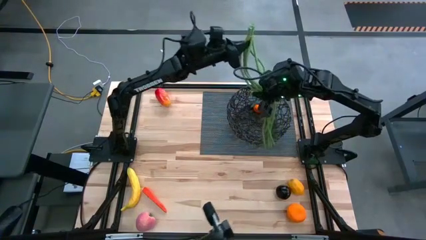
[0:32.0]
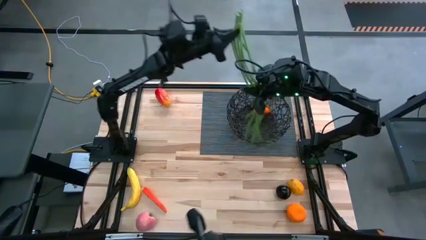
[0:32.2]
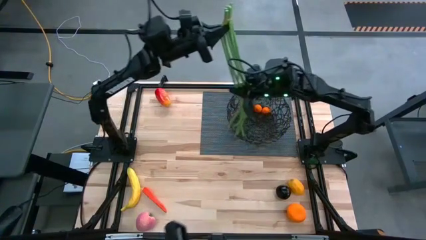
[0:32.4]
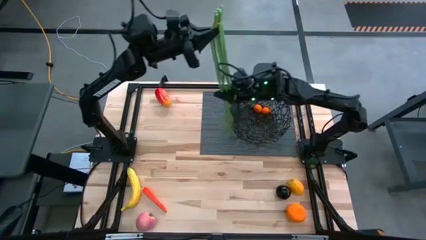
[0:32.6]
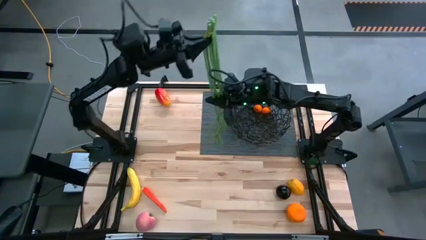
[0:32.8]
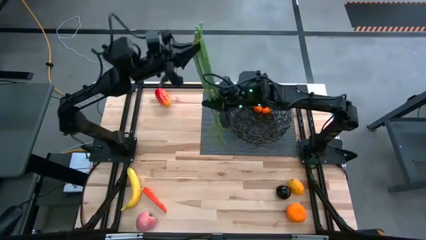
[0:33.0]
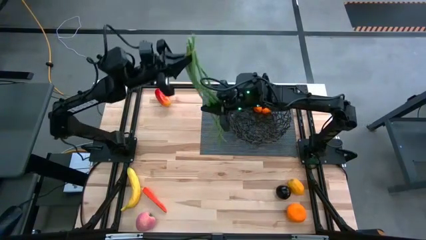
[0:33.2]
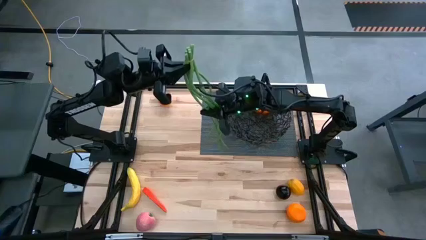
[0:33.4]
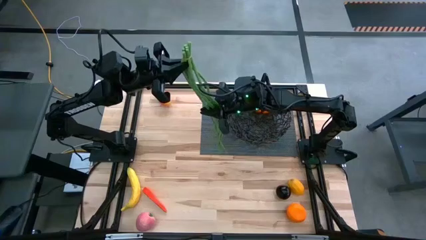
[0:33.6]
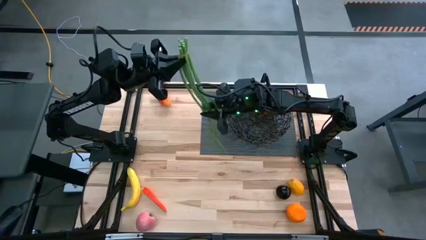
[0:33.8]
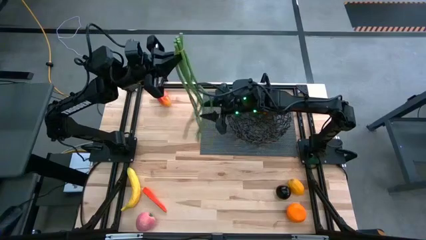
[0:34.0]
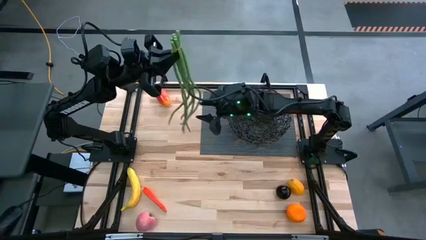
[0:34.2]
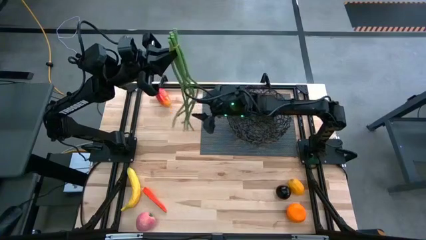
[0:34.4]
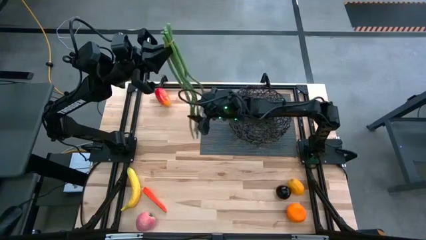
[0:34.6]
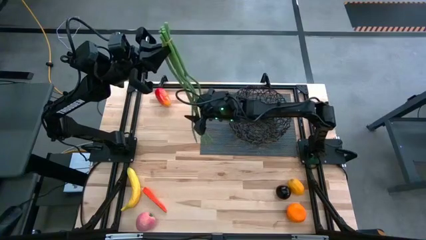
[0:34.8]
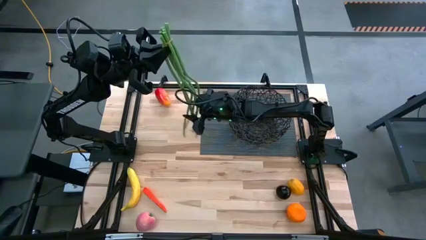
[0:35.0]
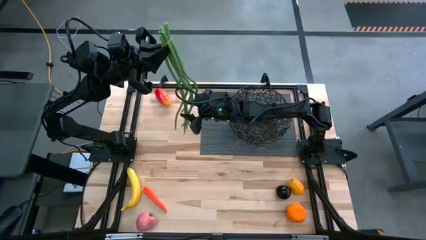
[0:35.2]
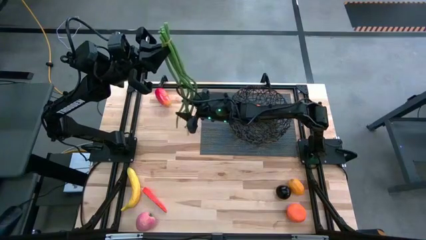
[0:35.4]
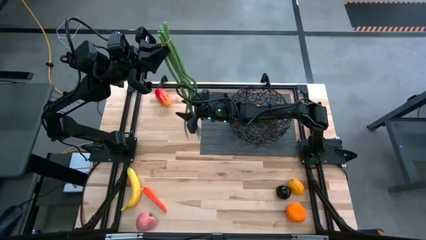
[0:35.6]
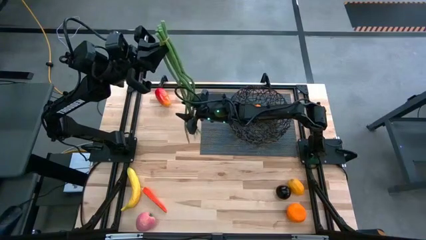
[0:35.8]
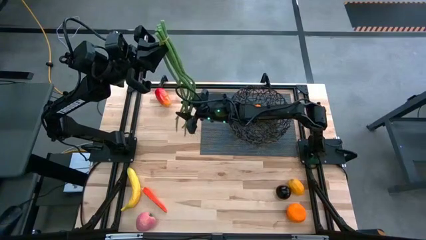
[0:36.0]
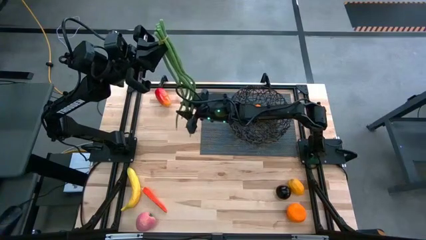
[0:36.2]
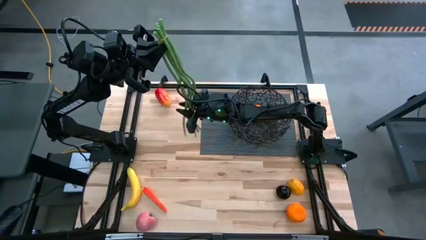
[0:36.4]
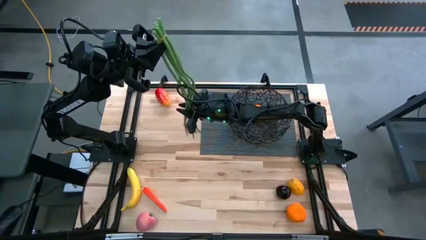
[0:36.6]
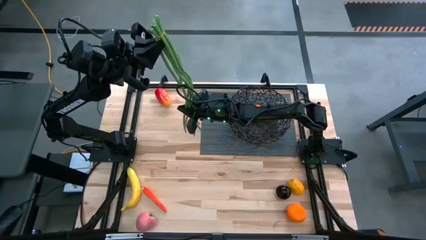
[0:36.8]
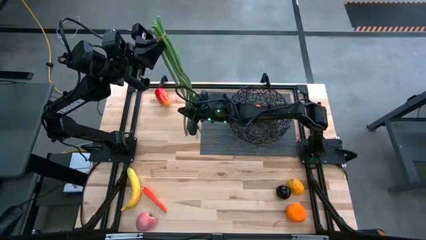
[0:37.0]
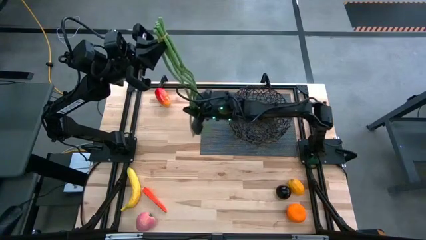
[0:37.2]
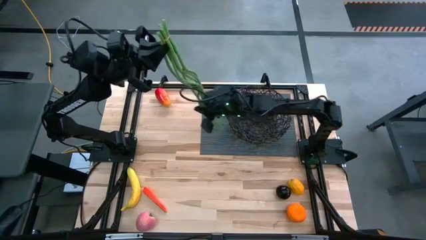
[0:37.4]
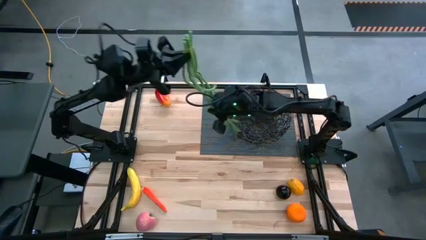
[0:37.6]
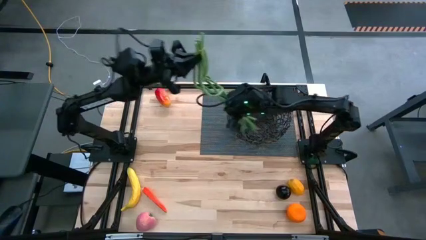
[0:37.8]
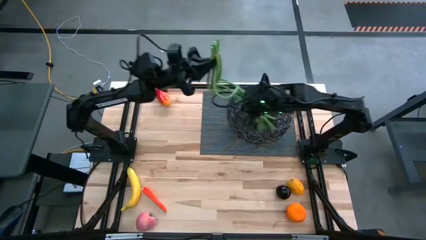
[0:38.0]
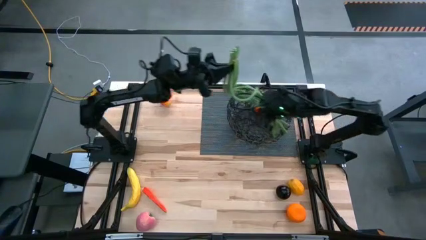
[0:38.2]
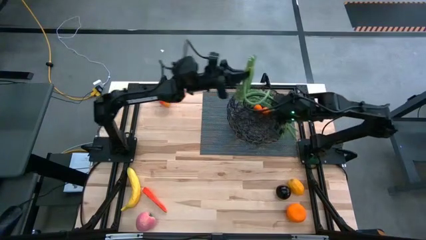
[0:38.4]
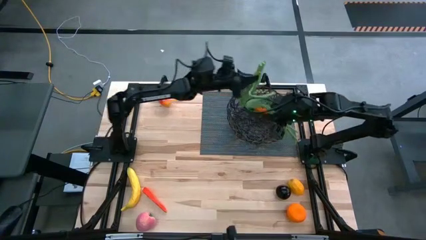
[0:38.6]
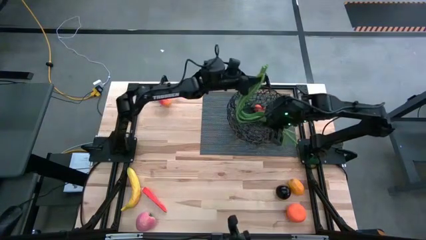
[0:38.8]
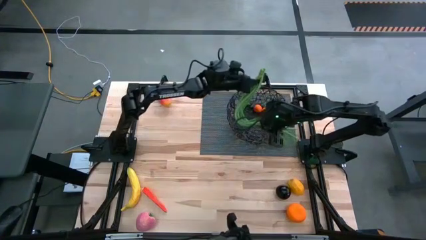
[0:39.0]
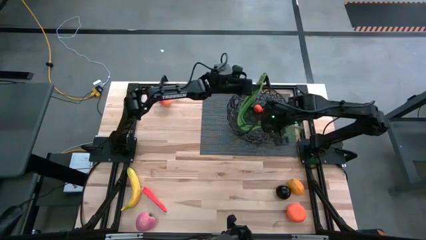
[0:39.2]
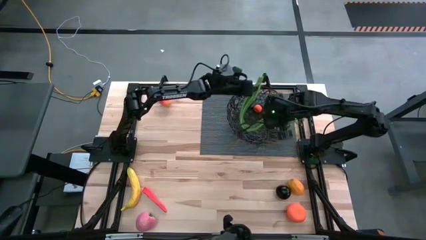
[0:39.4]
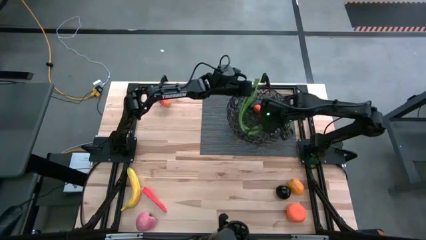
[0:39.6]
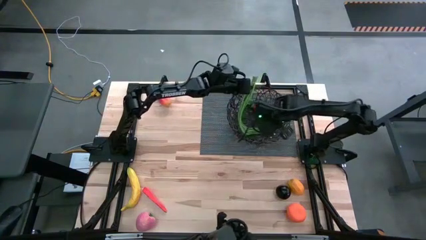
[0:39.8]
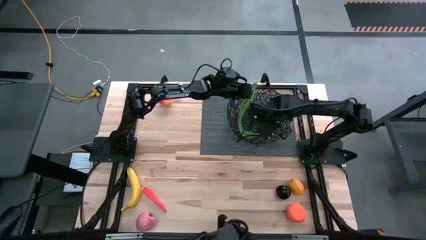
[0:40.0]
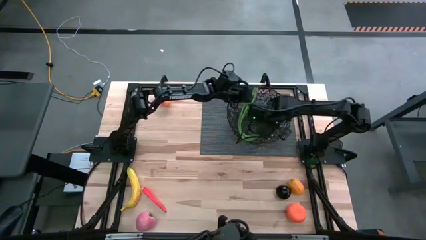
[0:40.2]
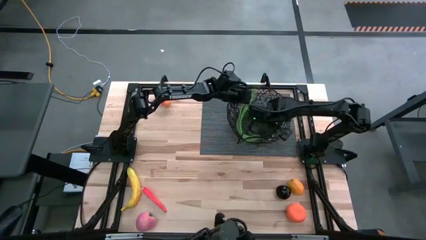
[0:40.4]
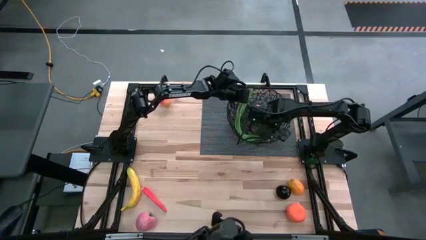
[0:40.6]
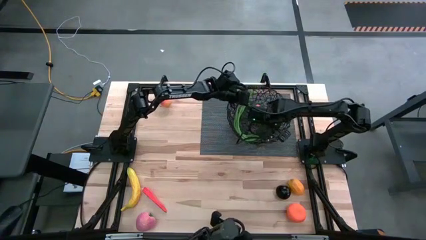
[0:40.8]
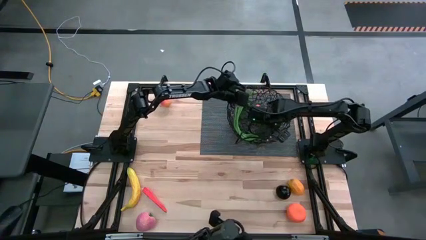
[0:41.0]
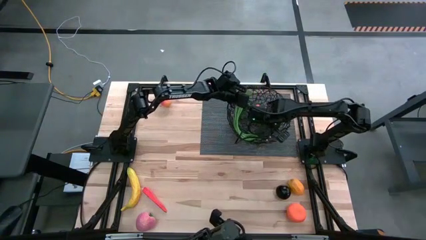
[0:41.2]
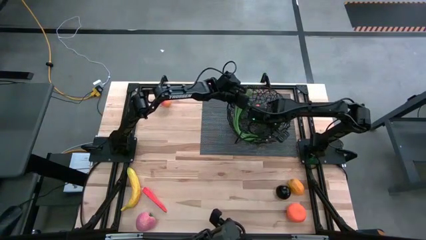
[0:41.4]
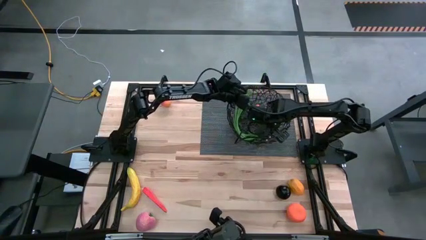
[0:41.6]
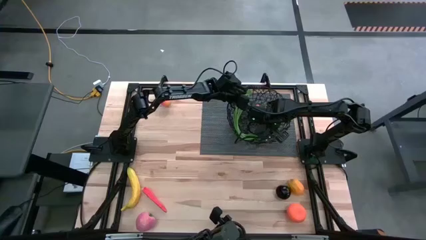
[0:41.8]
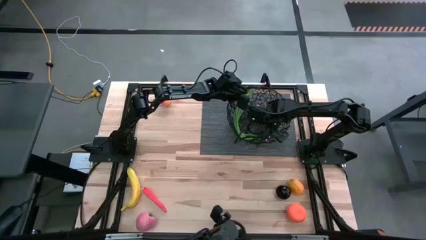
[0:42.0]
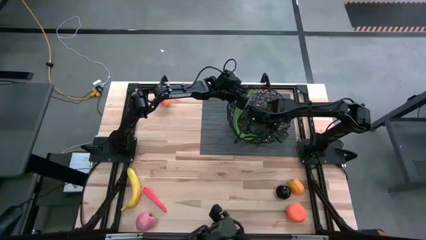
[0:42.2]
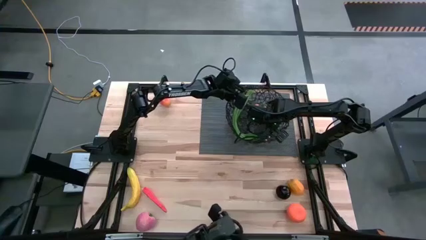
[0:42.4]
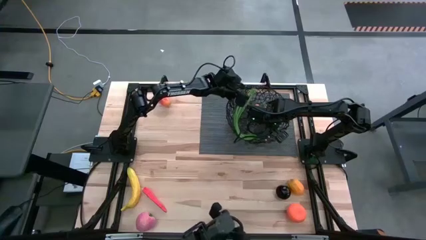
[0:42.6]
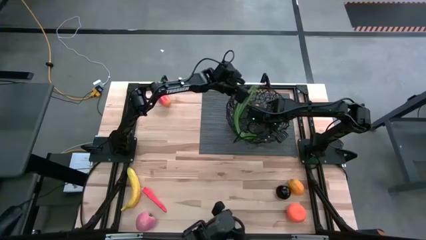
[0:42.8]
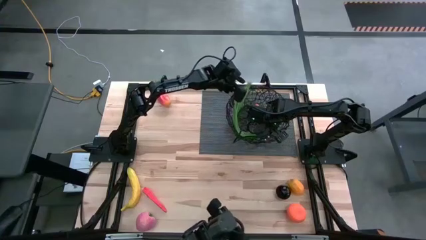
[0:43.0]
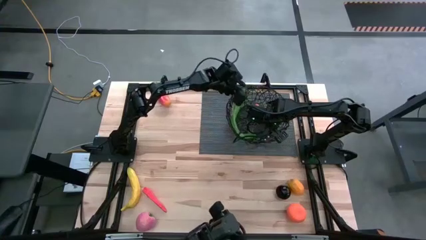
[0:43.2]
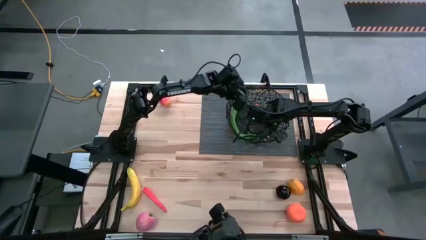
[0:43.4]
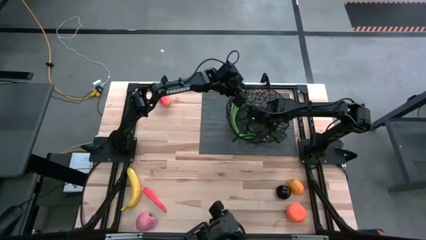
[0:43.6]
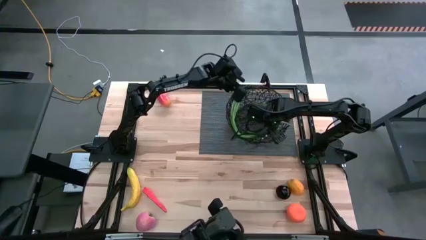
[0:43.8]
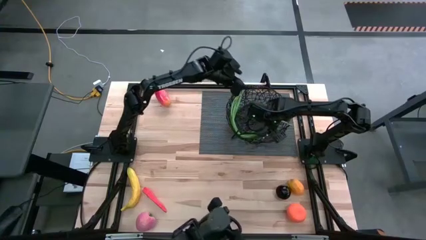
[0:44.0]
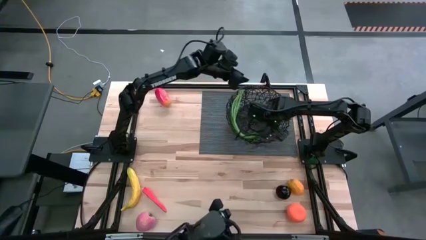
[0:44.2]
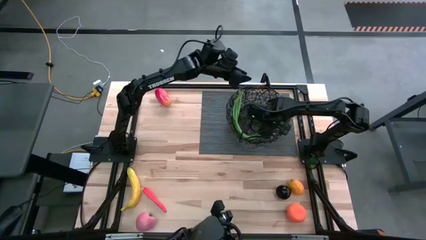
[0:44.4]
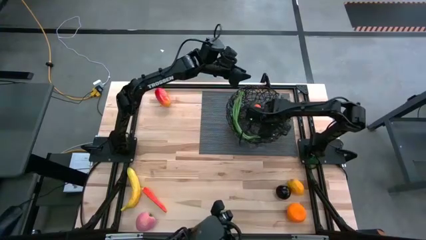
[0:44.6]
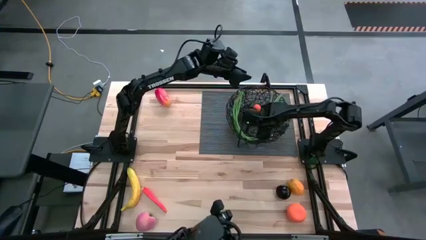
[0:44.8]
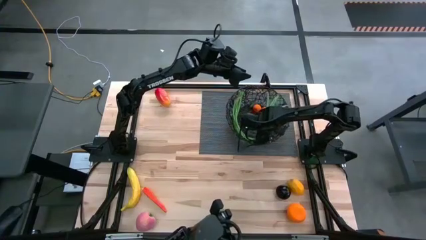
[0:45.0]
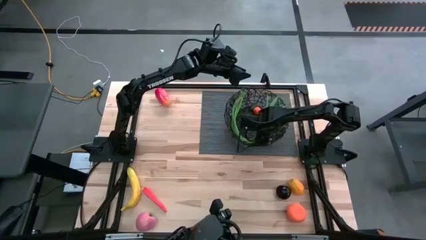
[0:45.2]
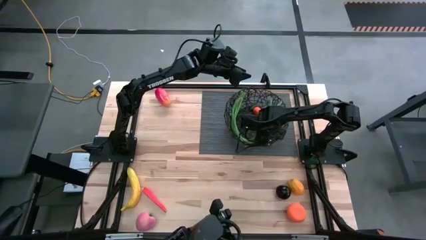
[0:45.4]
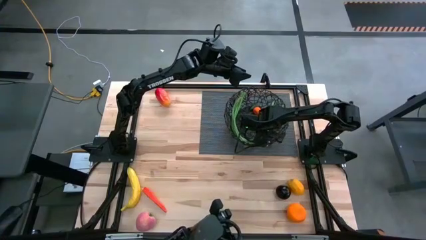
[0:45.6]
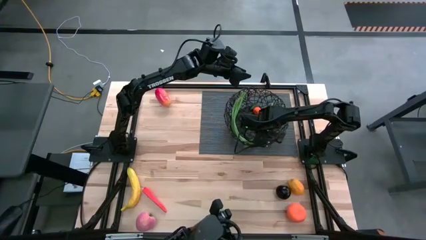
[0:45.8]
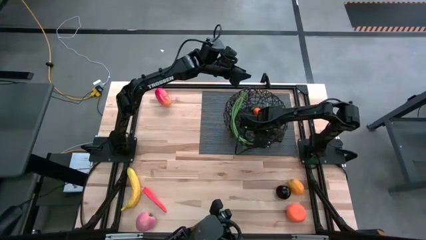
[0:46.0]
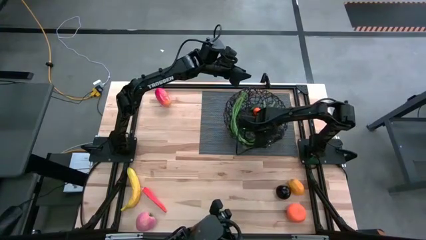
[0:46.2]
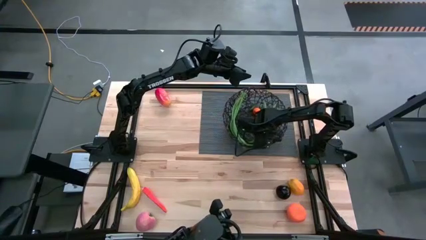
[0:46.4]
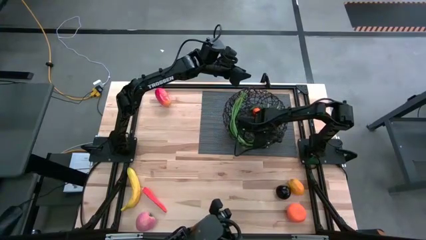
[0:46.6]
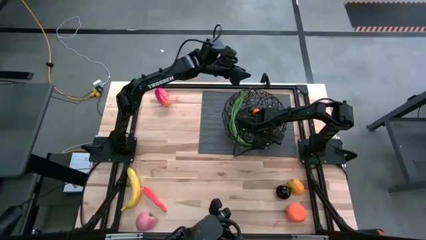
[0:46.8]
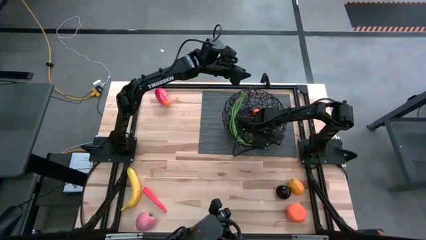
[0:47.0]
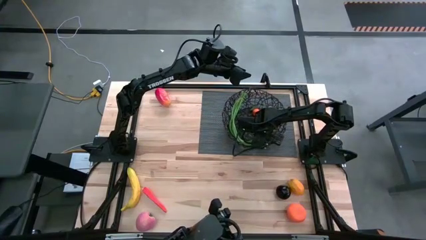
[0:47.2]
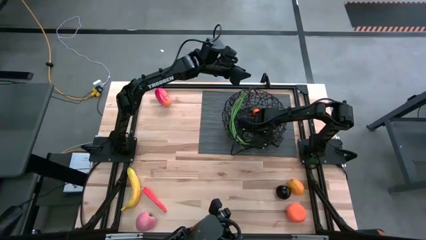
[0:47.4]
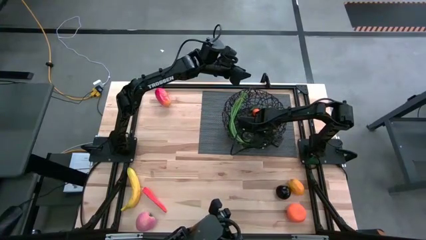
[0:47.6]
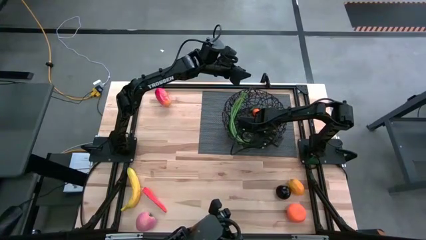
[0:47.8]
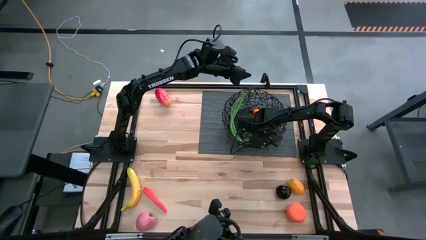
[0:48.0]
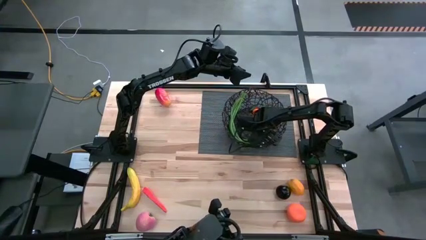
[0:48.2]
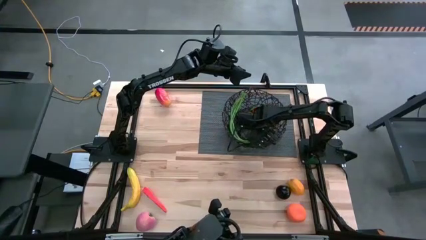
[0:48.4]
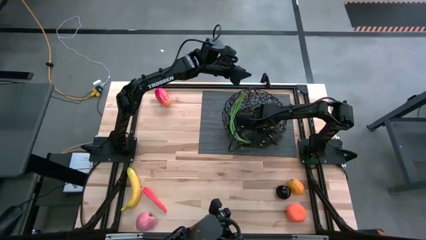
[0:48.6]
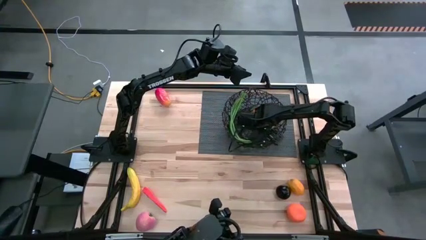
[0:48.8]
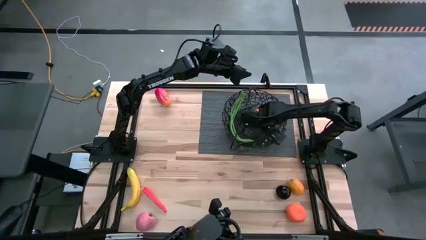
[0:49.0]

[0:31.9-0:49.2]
Task: Build produce basket
Put the leaf lettuce into the wire basket
